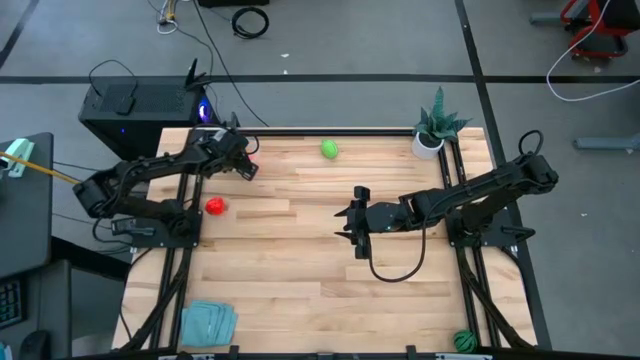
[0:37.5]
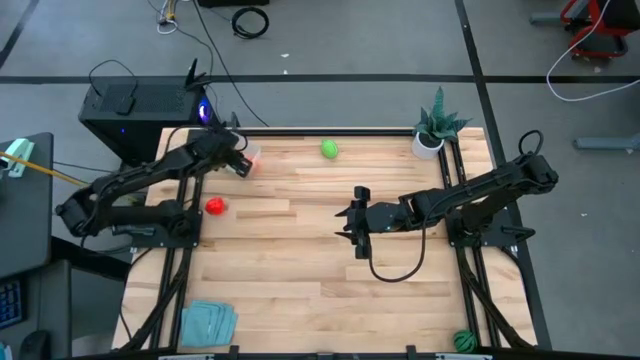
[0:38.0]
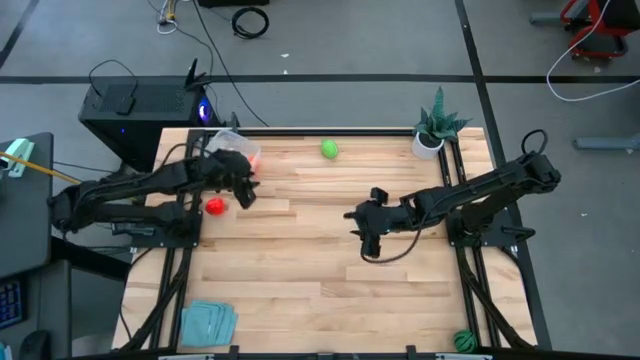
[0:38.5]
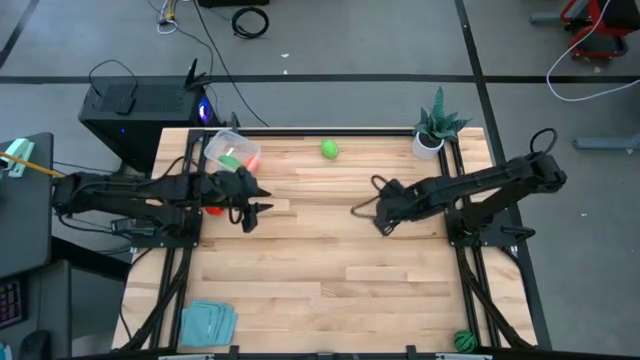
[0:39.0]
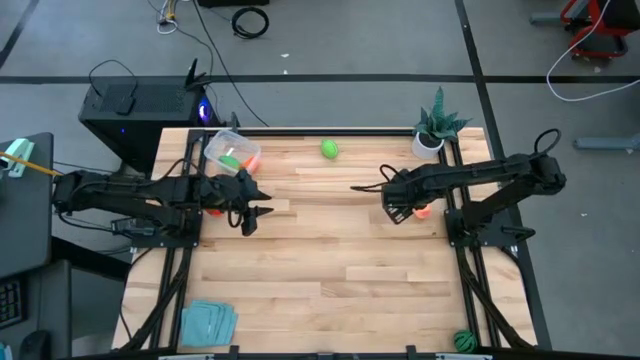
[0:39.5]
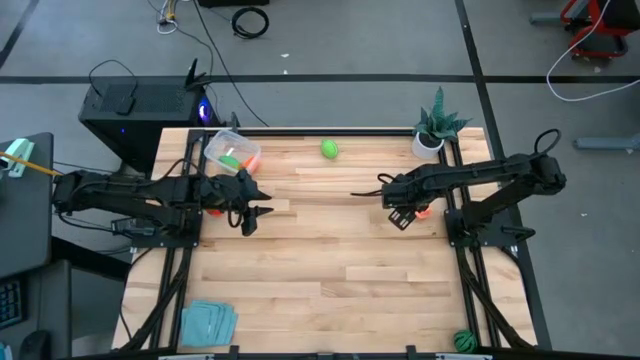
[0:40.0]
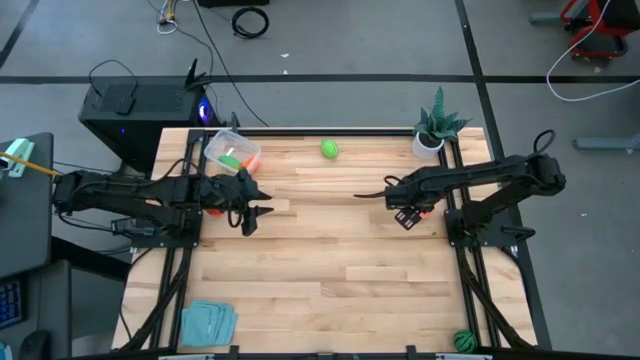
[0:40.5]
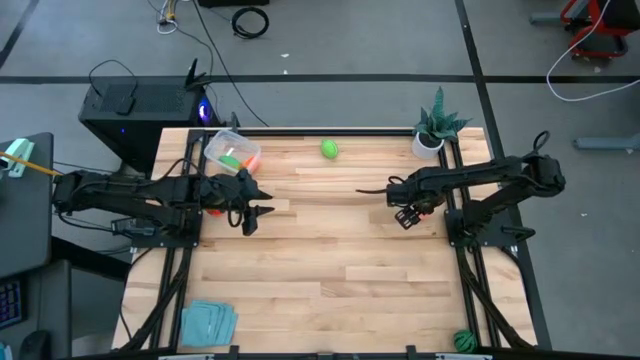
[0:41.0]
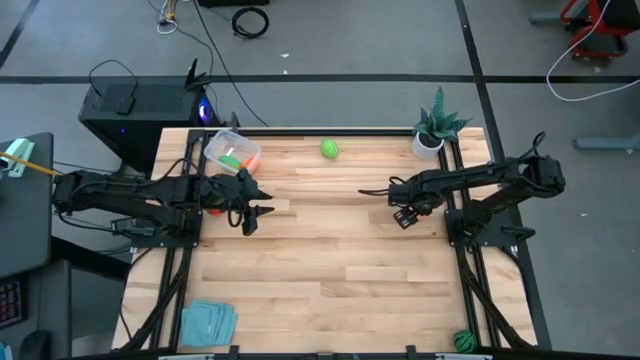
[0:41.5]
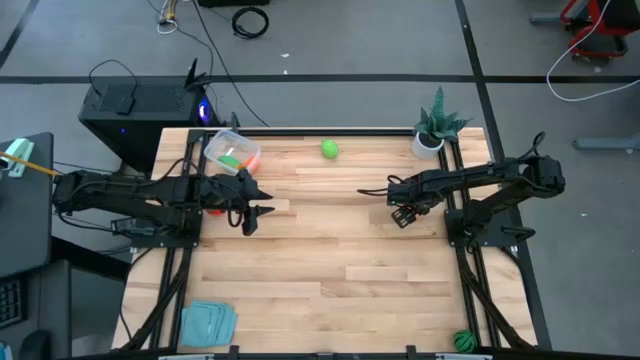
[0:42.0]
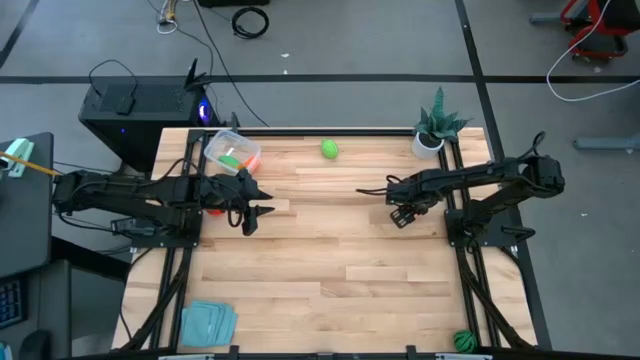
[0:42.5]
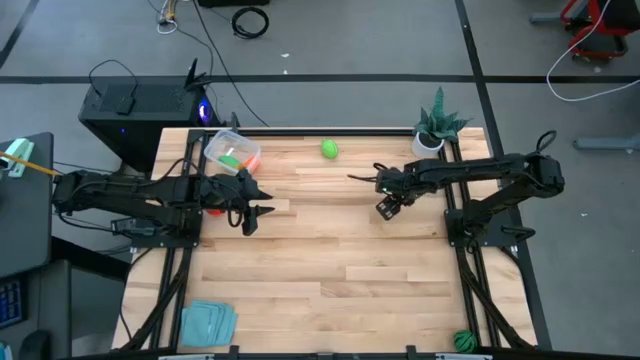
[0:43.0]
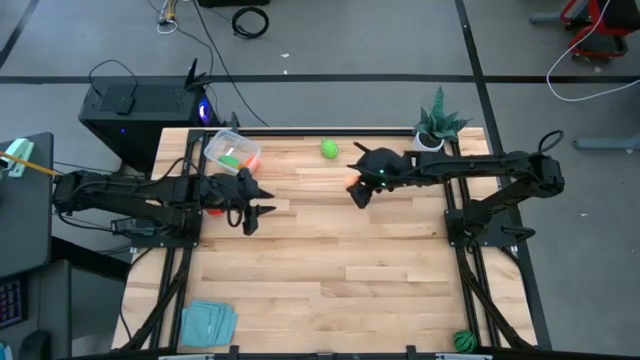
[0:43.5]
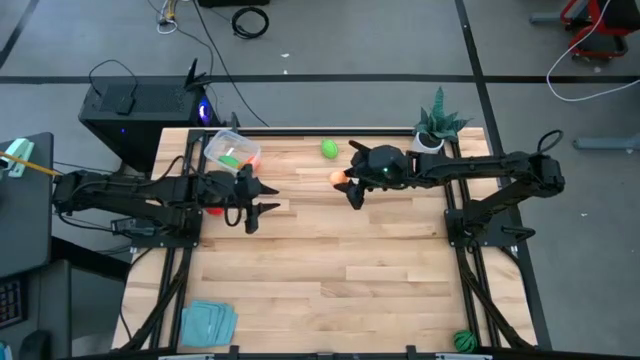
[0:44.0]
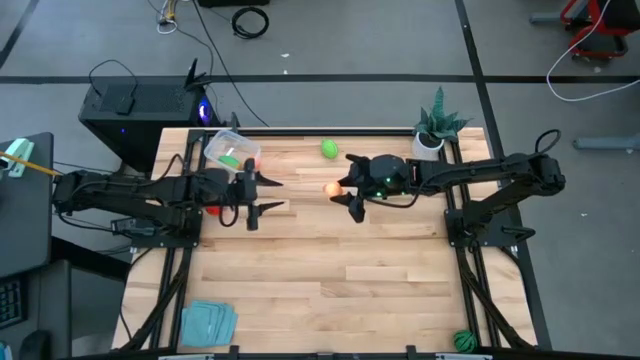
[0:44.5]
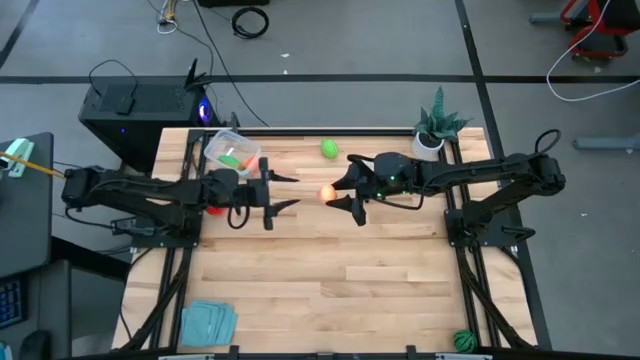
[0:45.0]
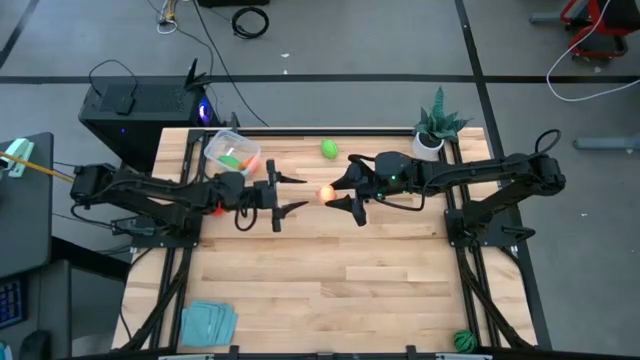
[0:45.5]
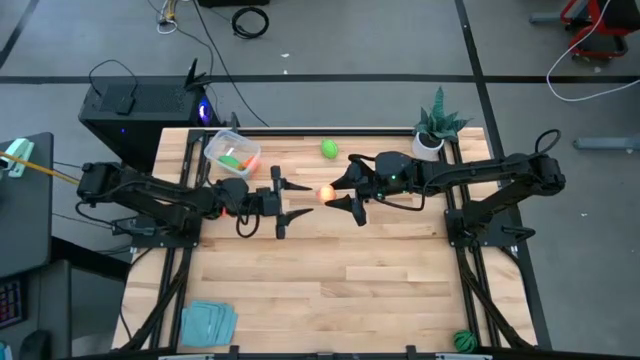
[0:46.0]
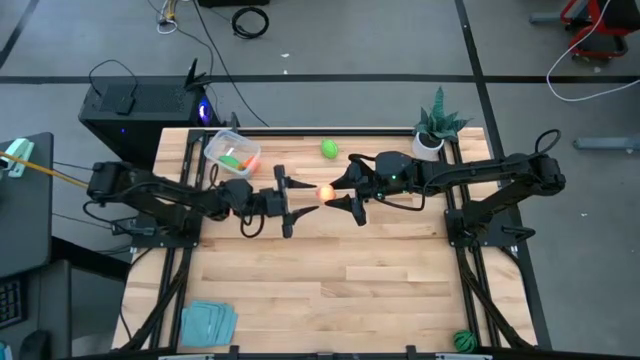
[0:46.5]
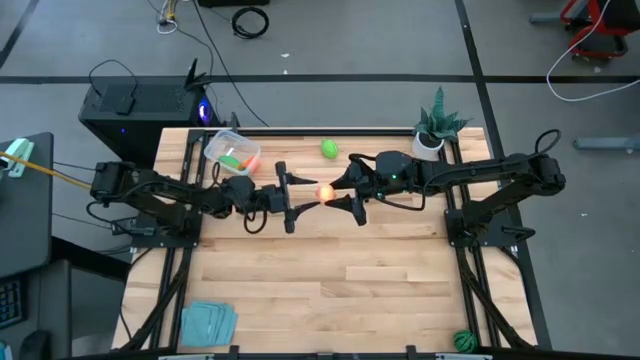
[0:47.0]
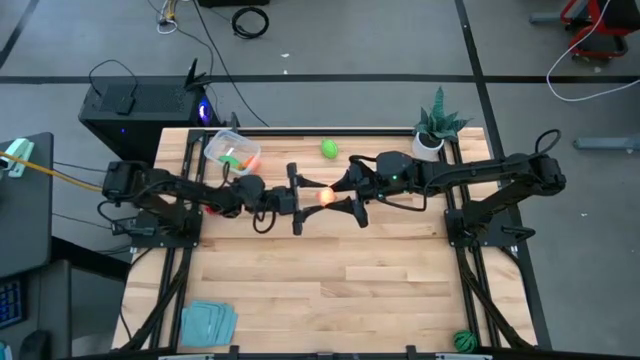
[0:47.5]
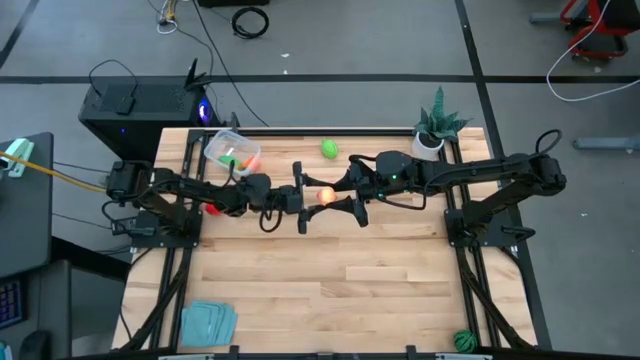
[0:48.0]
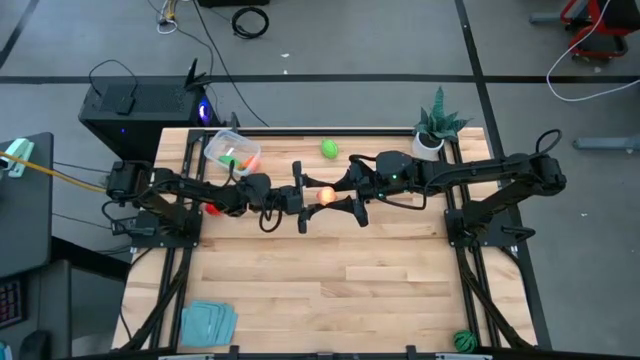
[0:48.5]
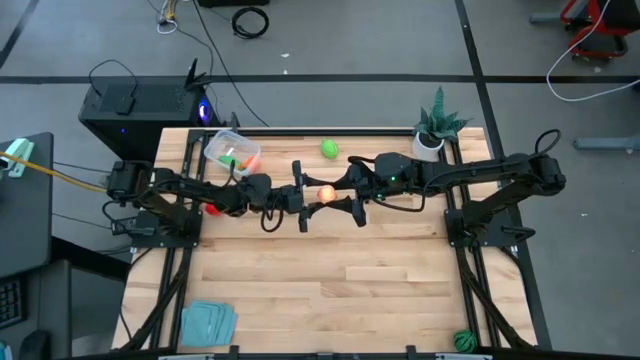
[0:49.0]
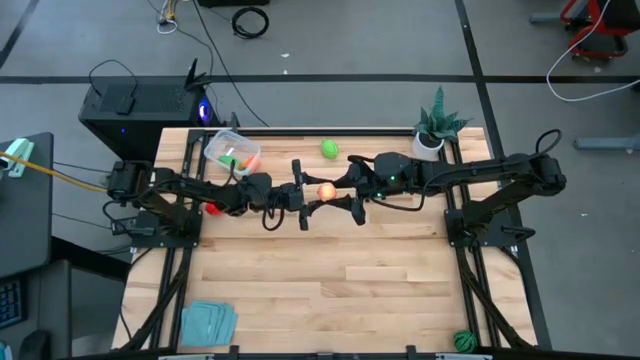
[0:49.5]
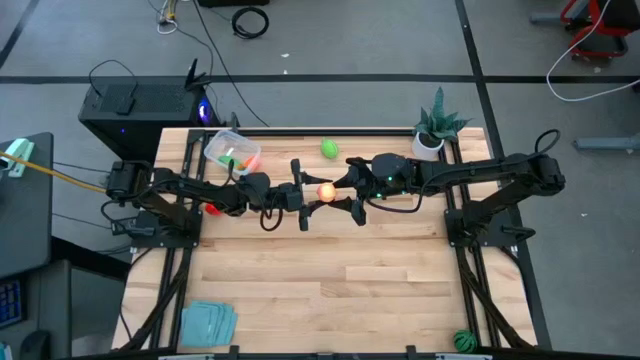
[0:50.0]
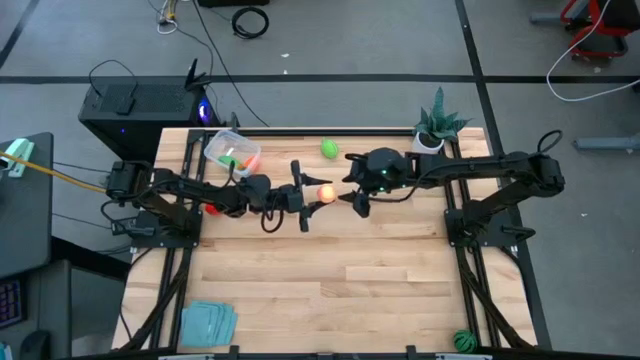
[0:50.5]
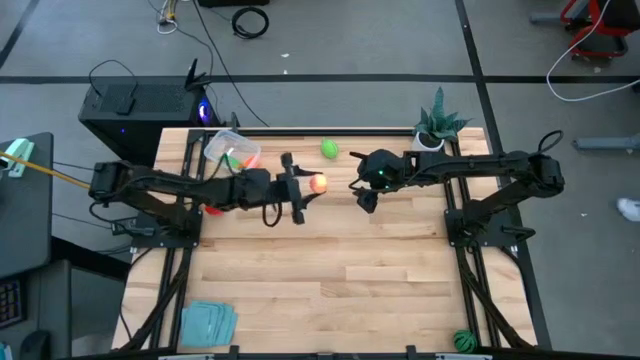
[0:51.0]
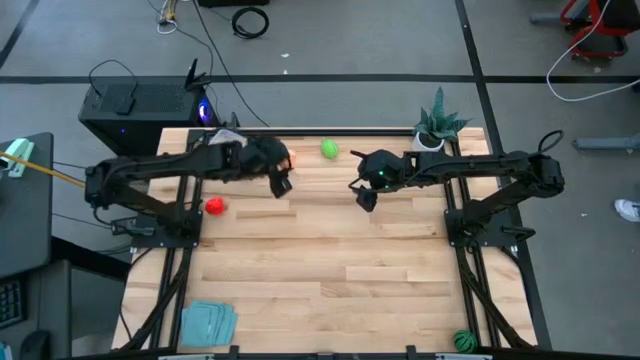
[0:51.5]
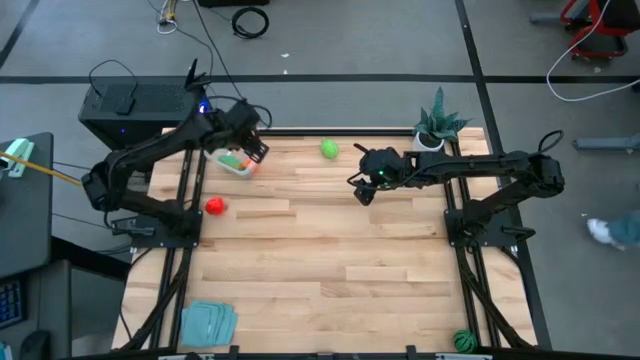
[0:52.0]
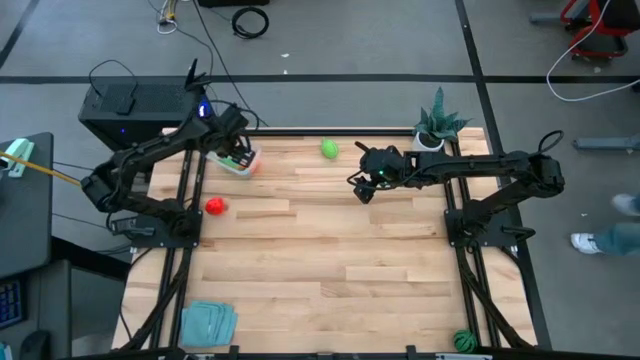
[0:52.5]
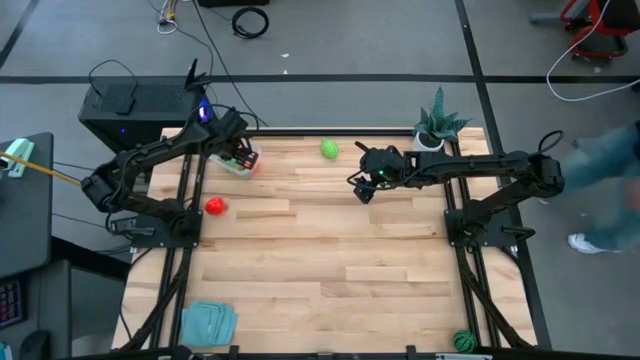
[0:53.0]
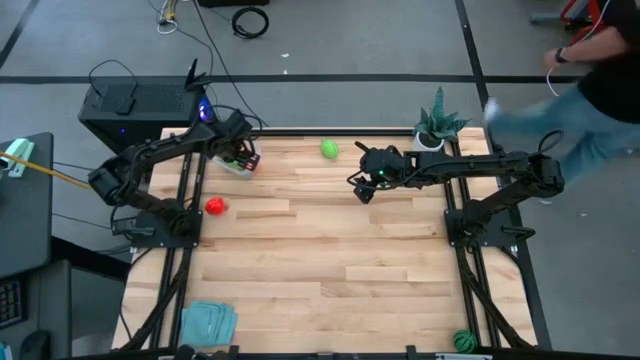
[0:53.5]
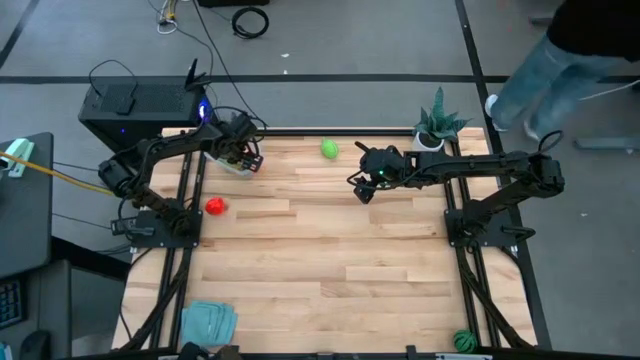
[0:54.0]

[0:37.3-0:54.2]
Task: Pick and placing Produce into tupperware
Put the light orange peach into the transparent bin

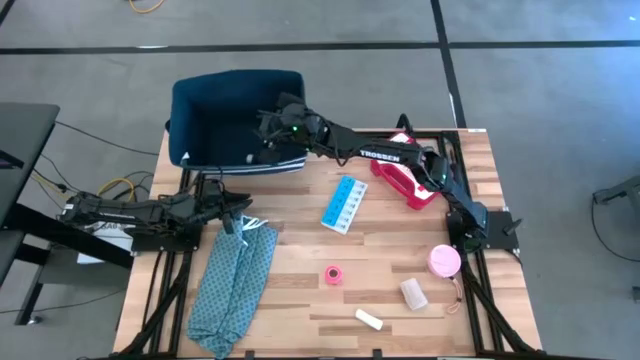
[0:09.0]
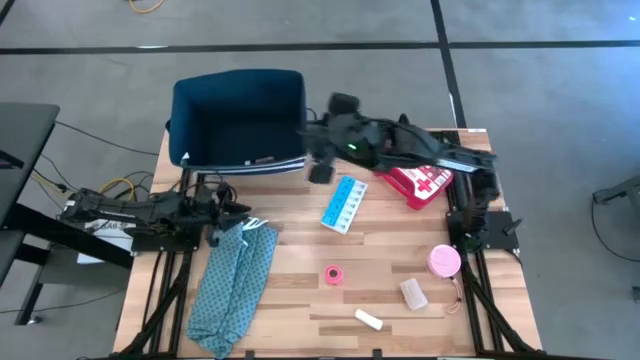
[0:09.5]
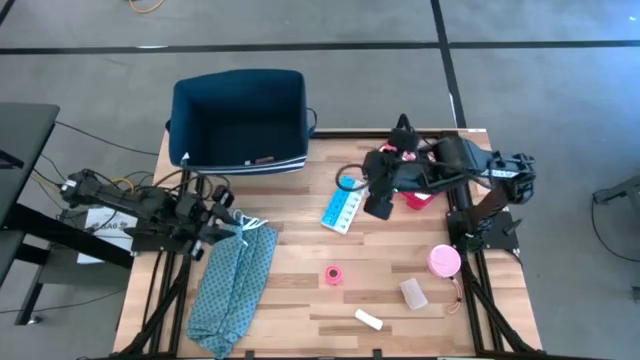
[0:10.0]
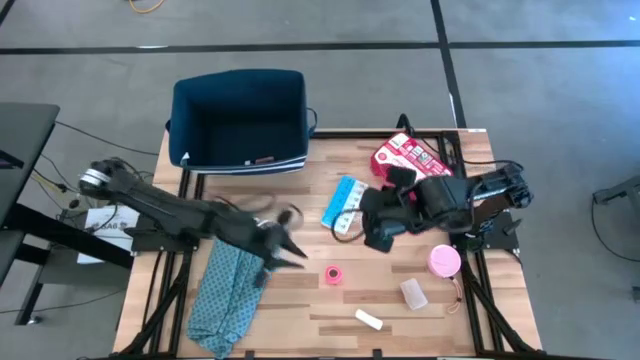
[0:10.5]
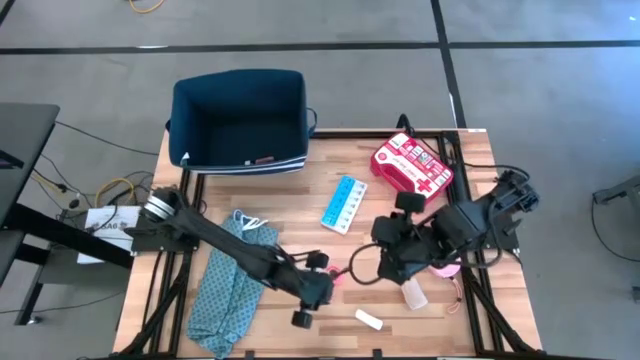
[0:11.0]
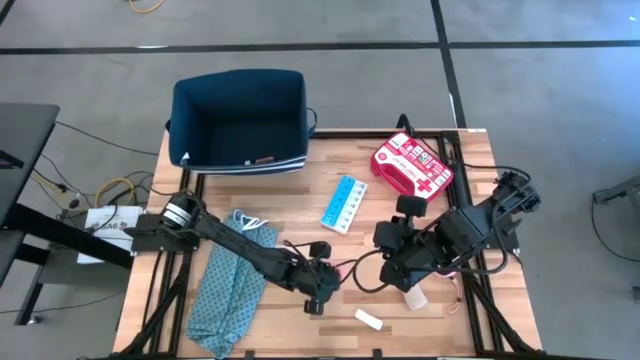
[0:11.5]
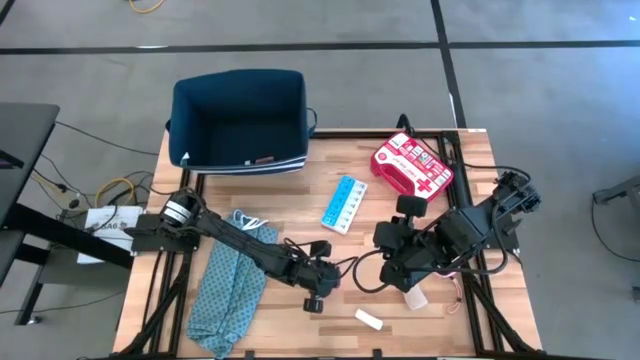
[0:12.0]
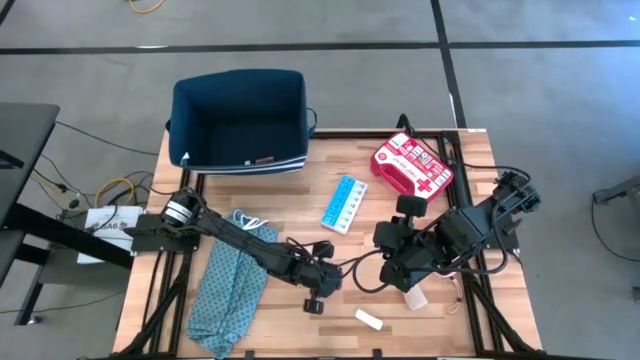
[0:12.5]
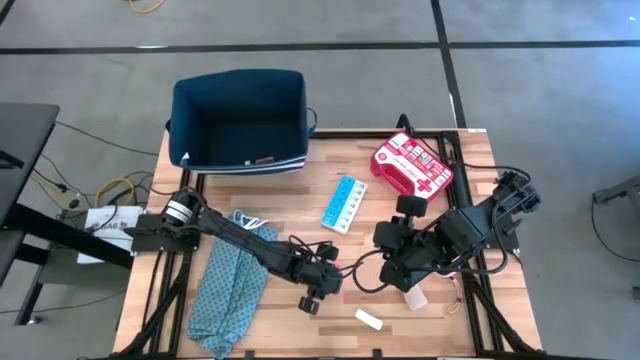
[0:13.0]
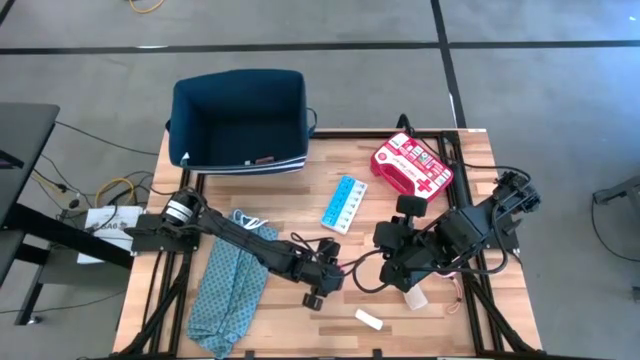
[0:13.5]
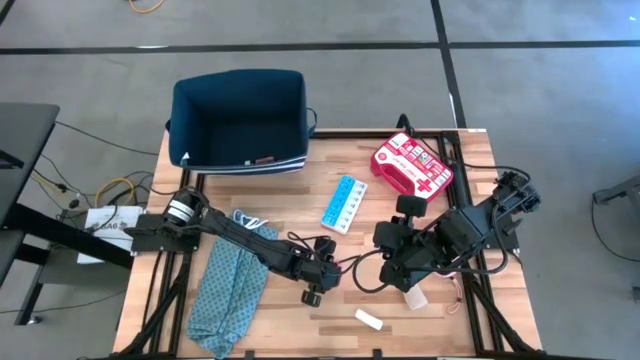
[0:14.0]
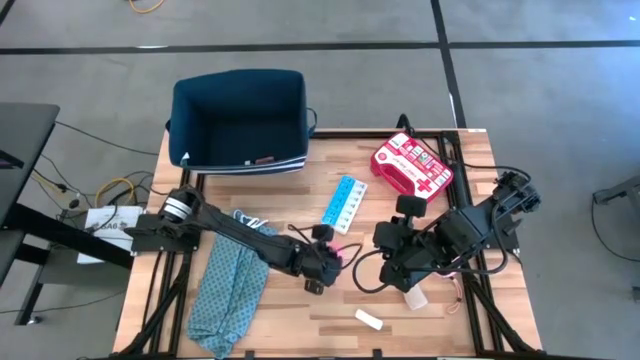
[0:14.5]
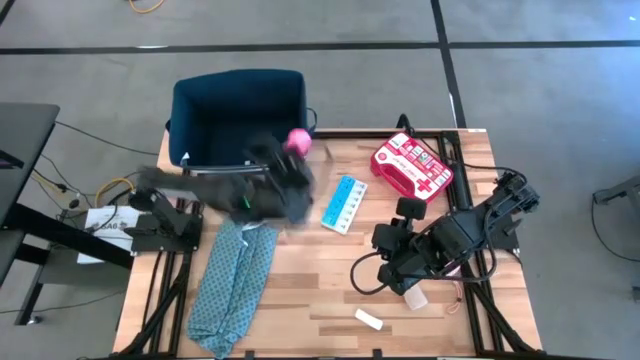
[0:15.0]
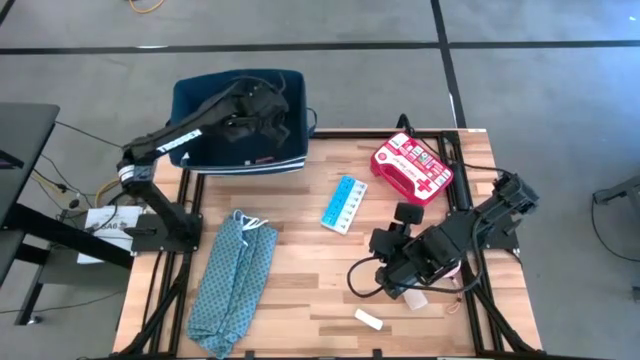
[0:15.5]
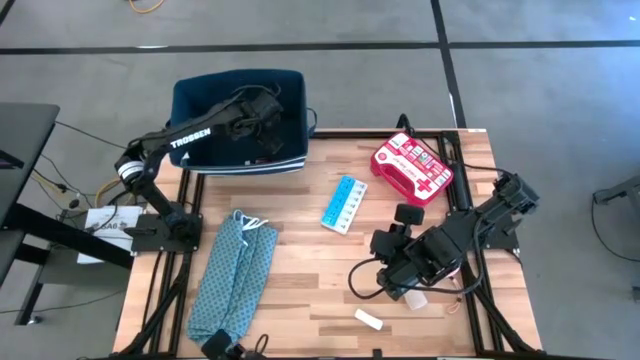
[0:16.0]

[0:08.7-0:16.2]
Task: Pick & place medical supplies in basket/bin
Put the pink bandage into the blue bin
